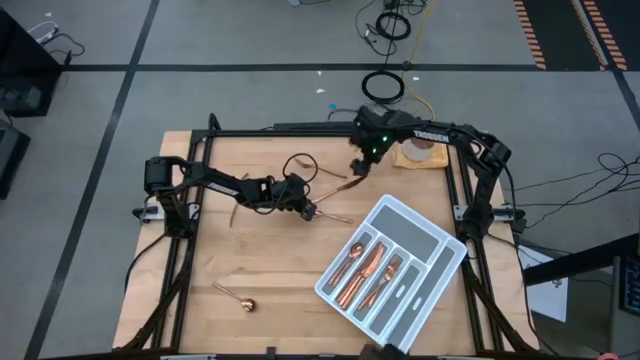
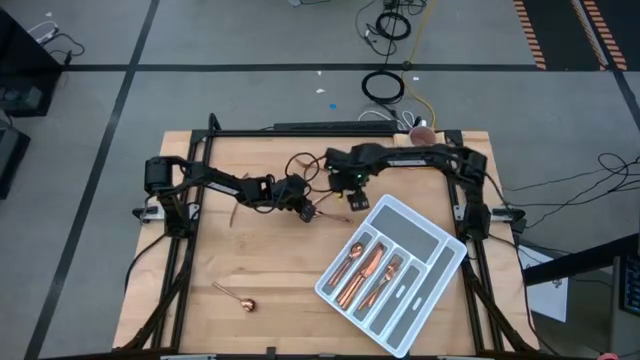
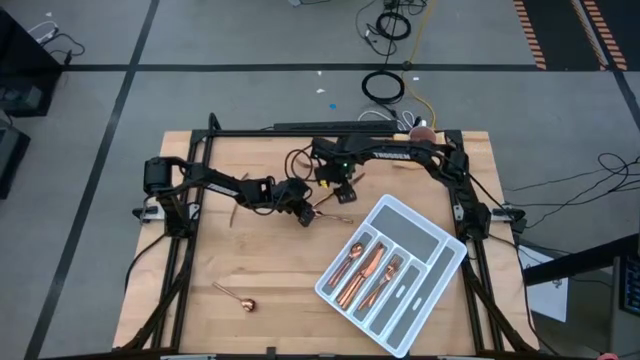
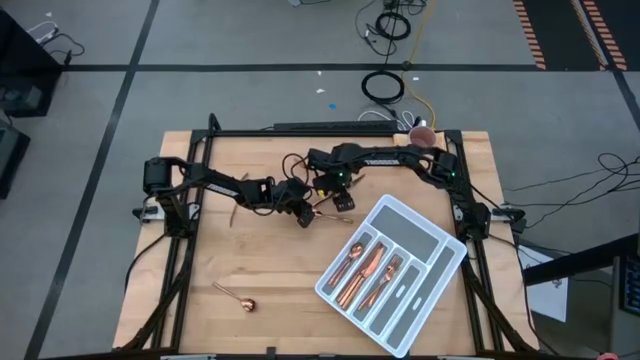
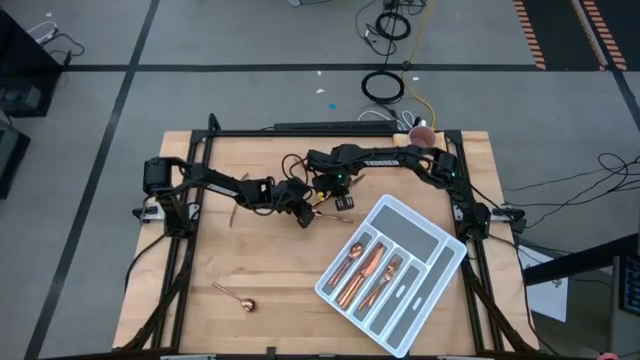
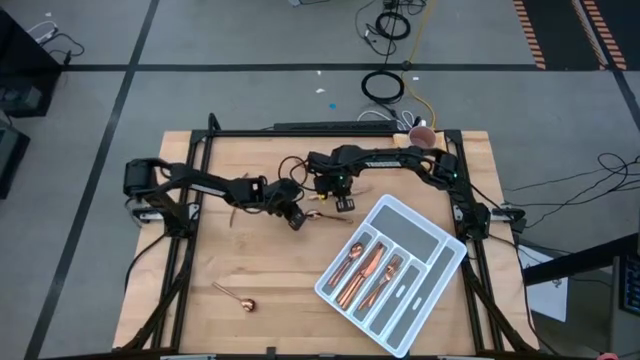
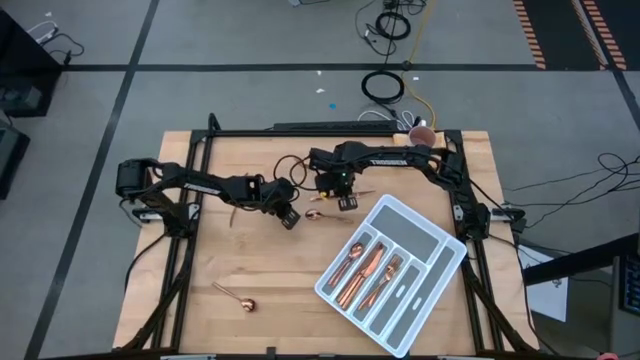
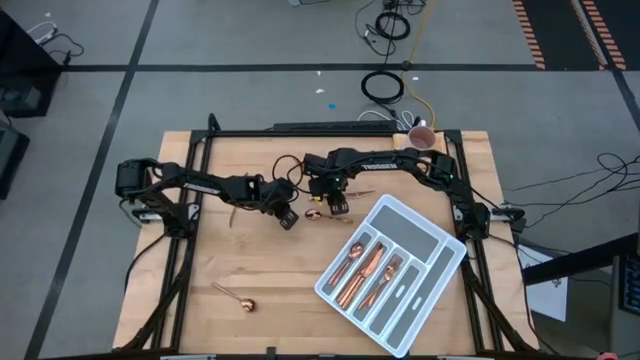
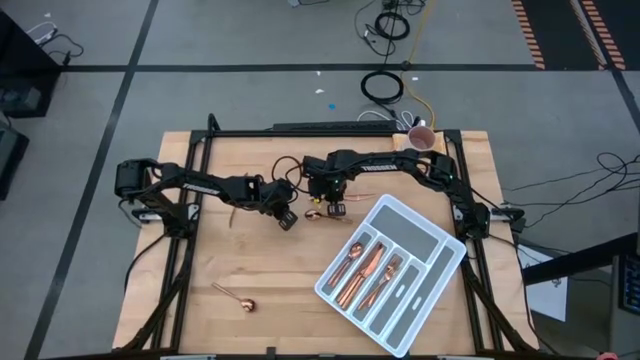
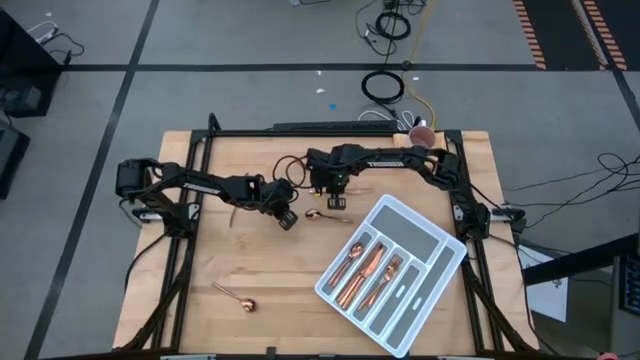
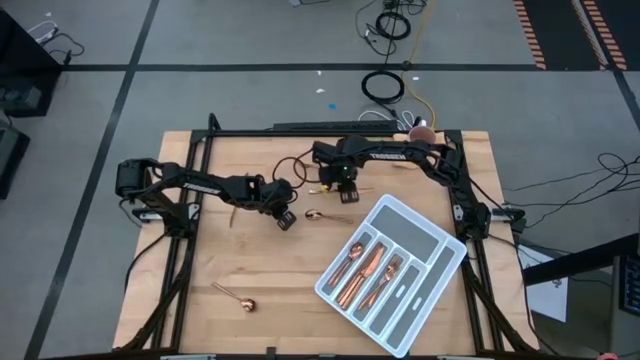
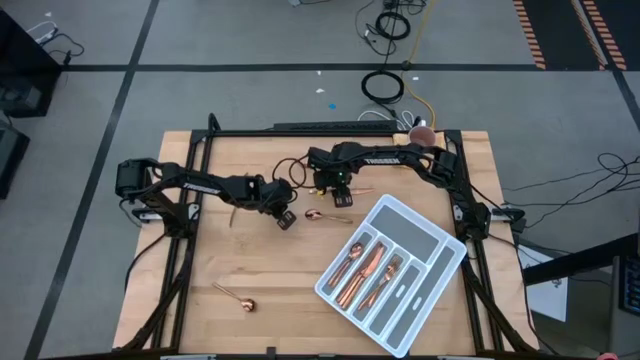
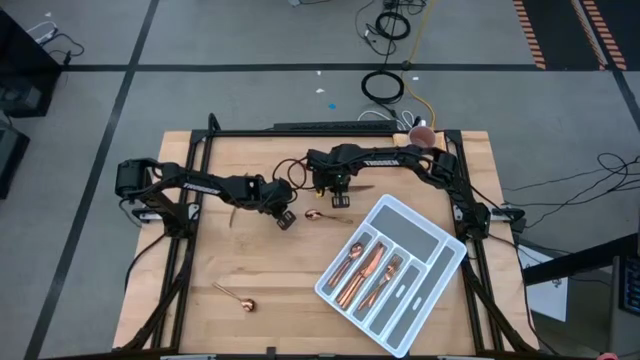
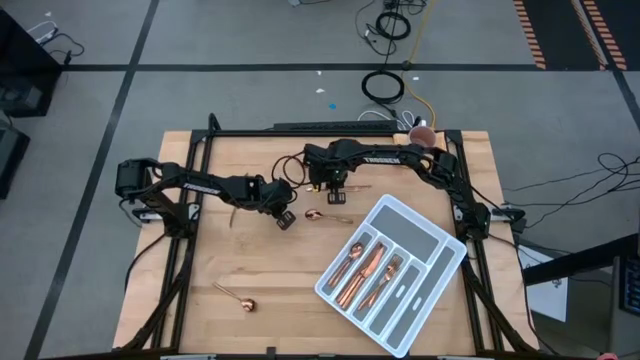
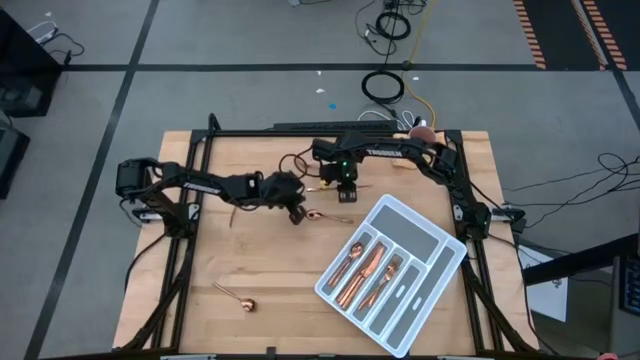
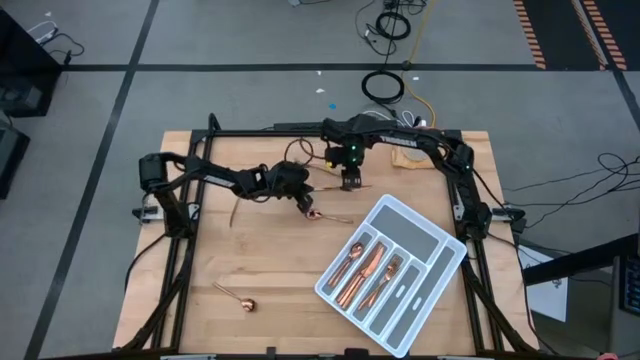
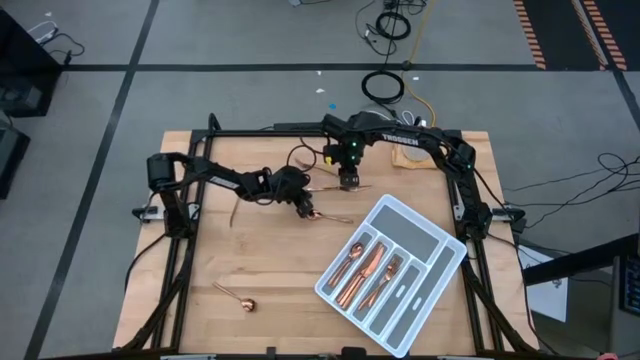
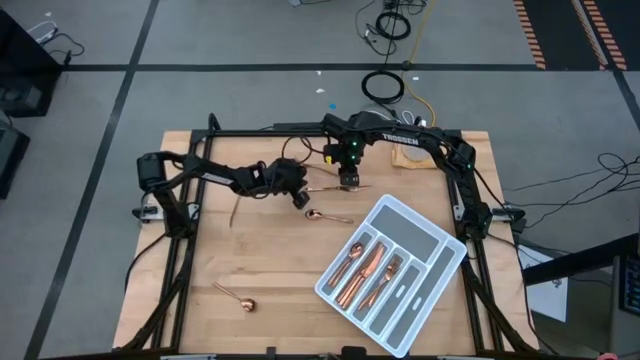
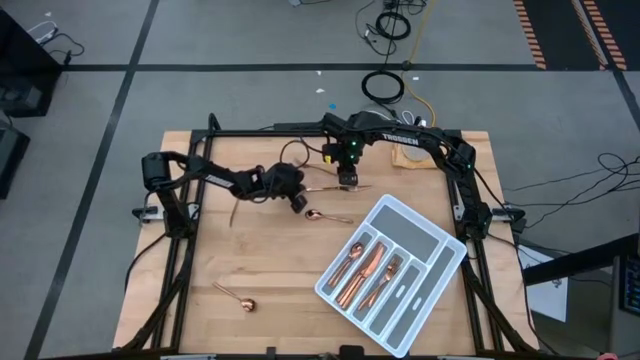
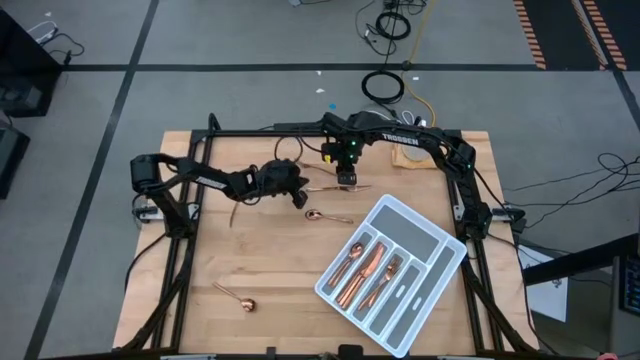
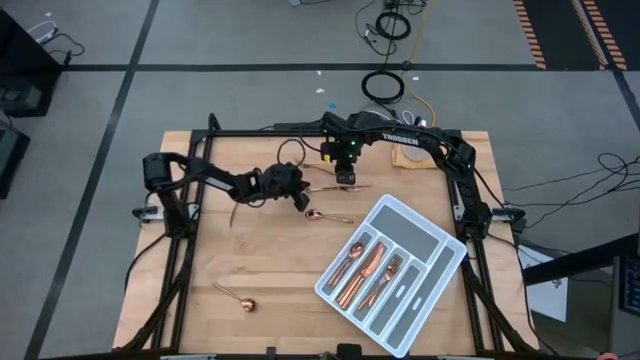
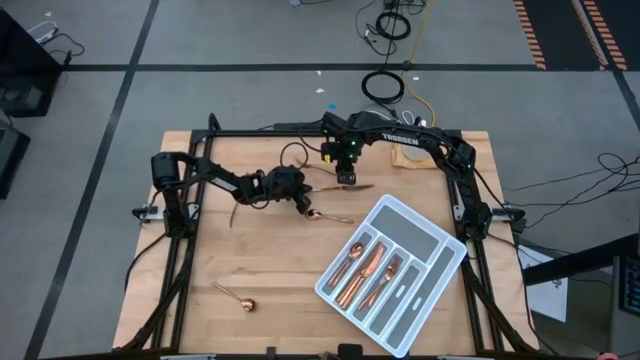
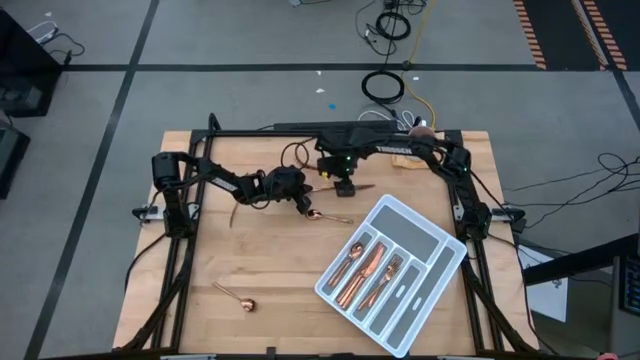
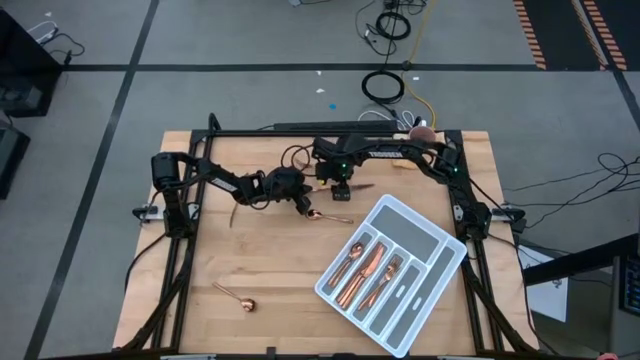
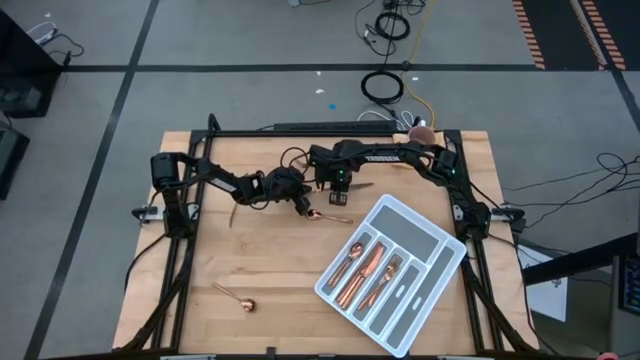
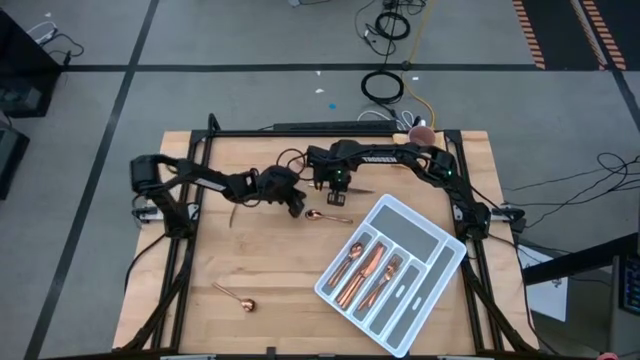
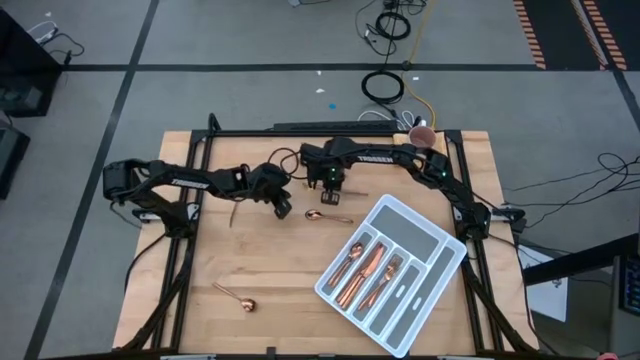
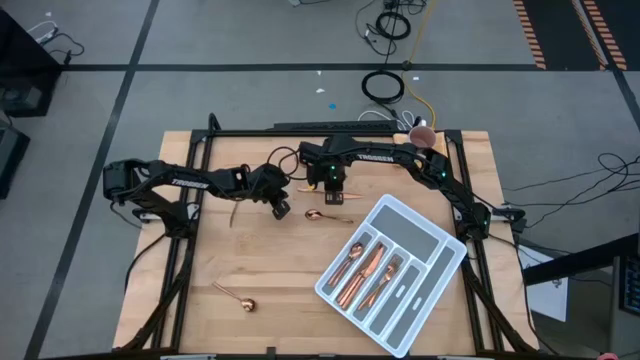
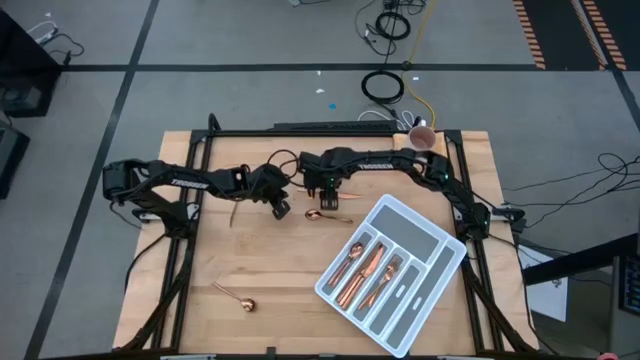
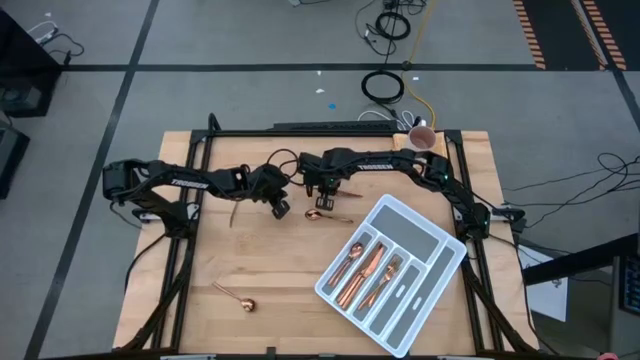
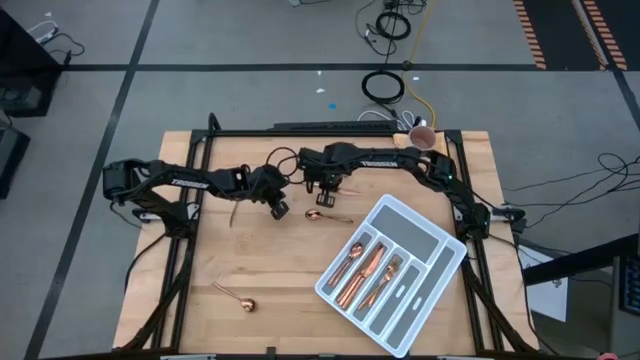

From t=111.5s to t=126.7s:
Task: Sort silverware
Put the gold spoon into the cutlery tray with the other gold spoon

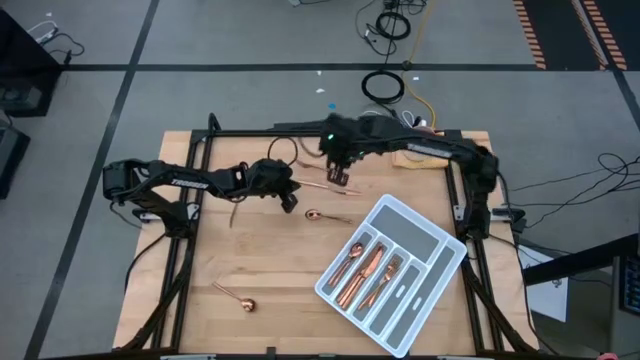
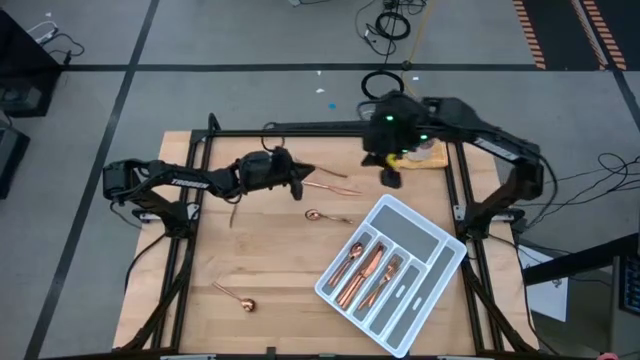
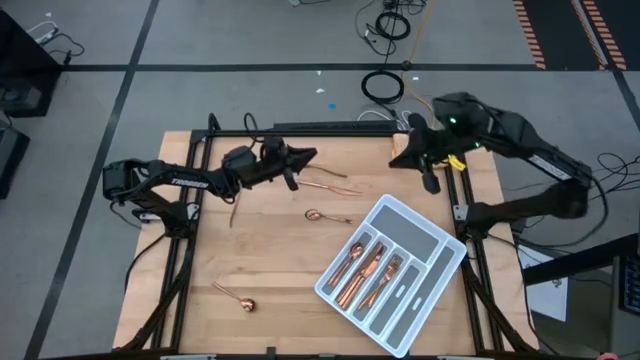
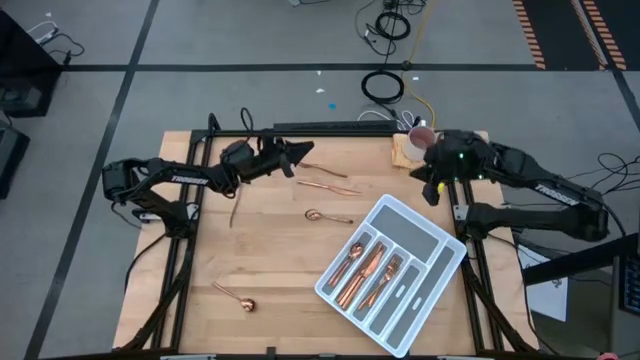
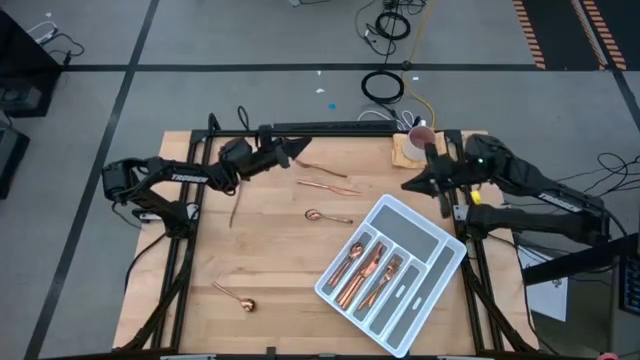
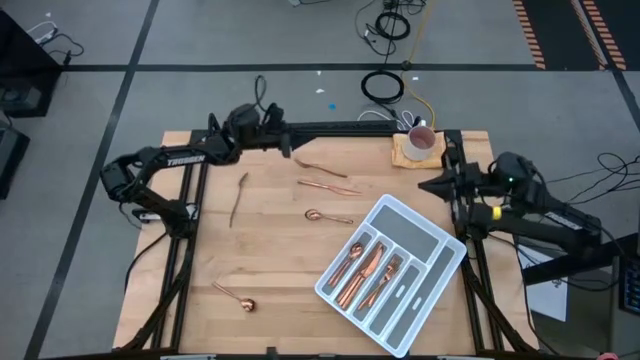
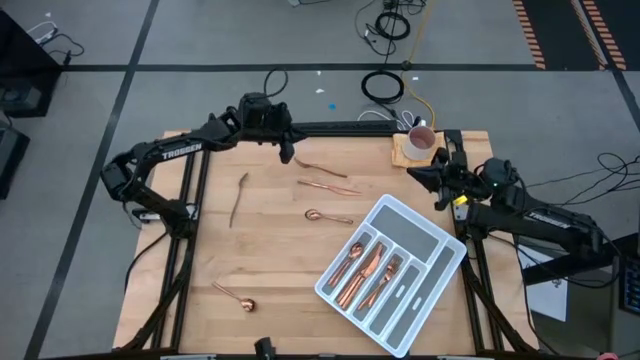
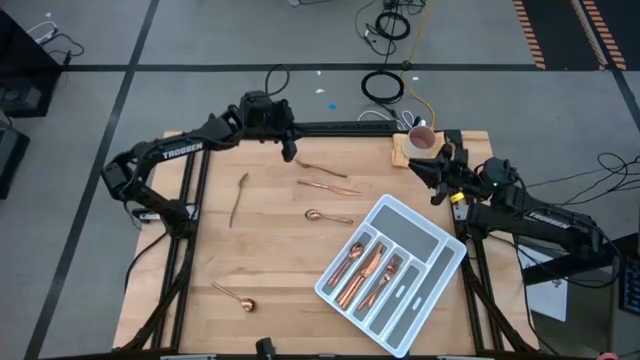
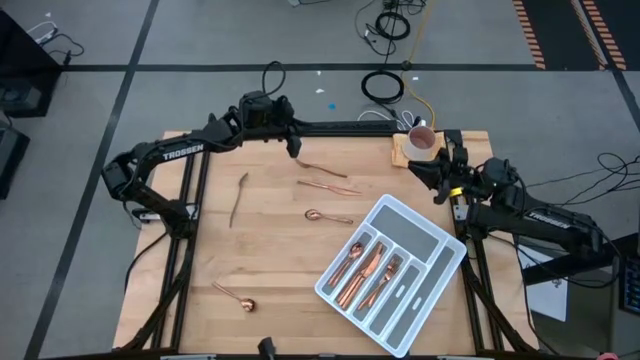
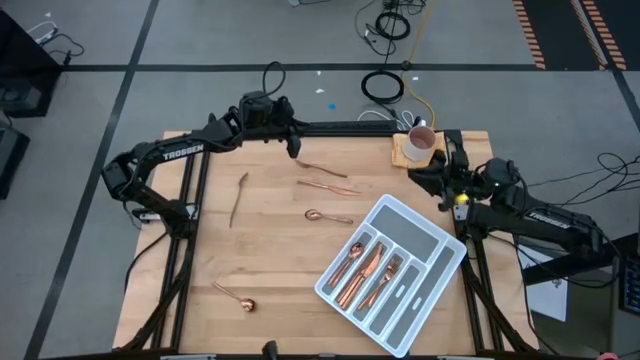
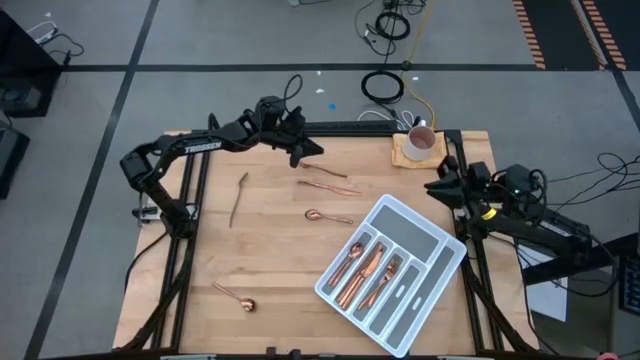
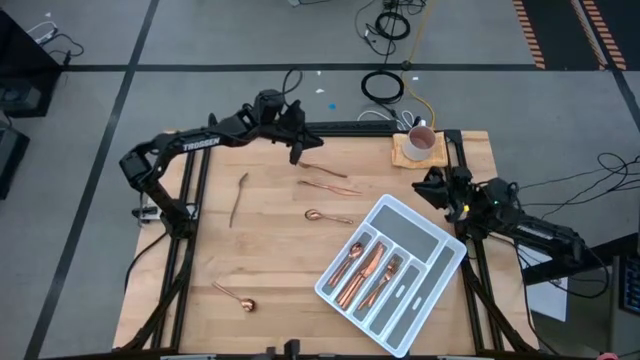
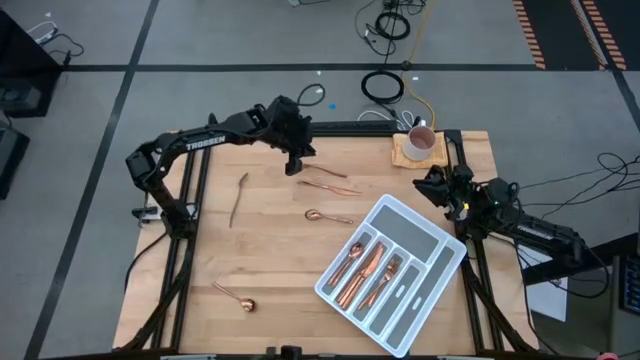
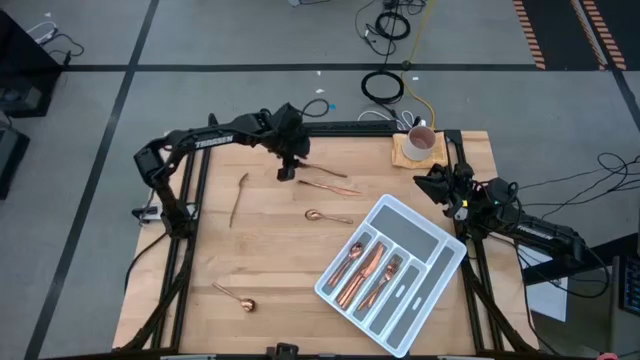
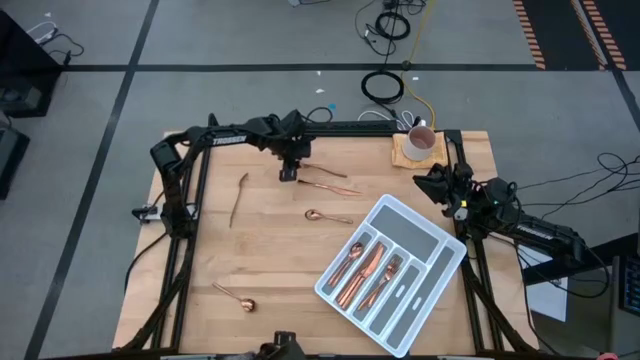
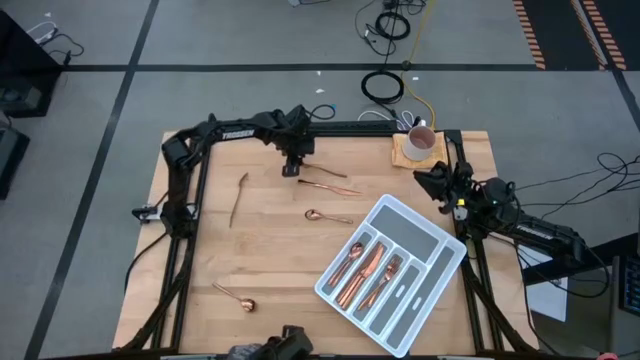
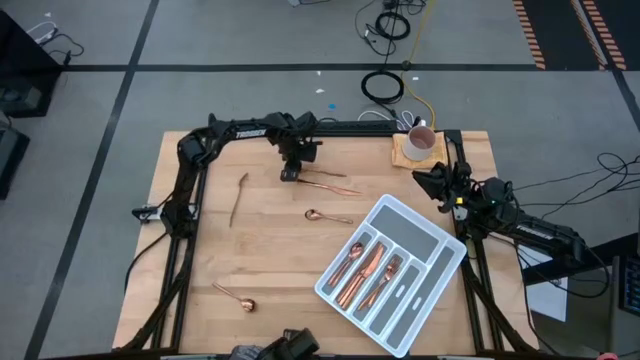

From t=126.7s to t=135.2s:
Put the gold table knife into the cutlery tray with the other gold table knives
